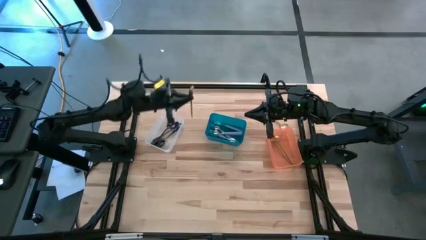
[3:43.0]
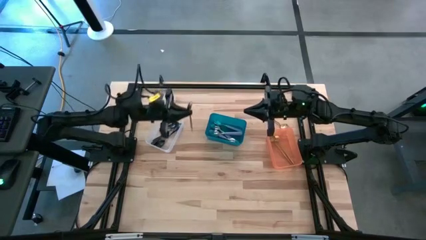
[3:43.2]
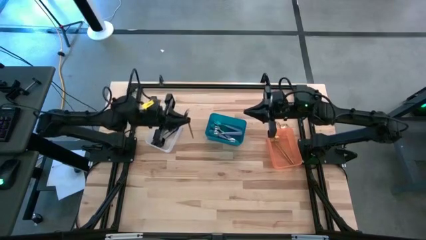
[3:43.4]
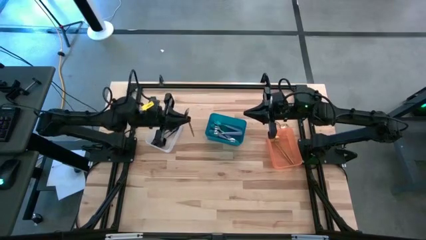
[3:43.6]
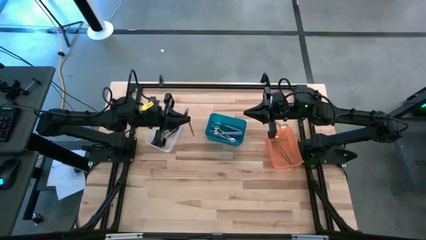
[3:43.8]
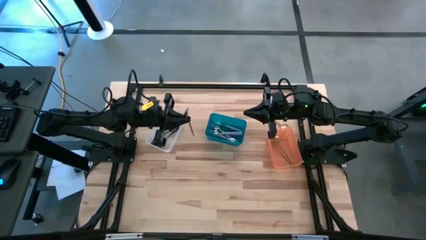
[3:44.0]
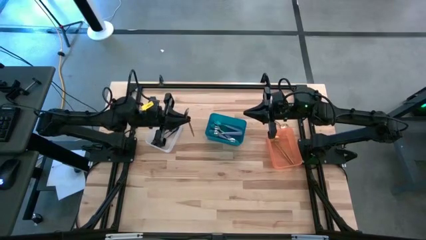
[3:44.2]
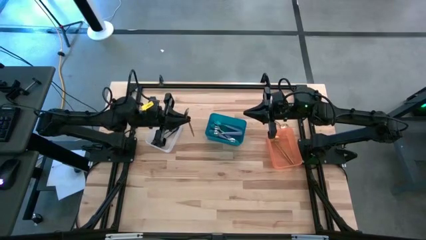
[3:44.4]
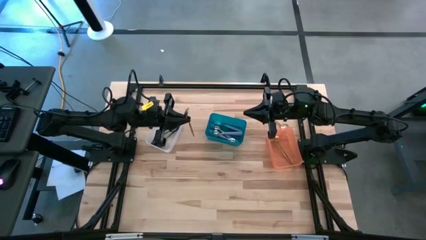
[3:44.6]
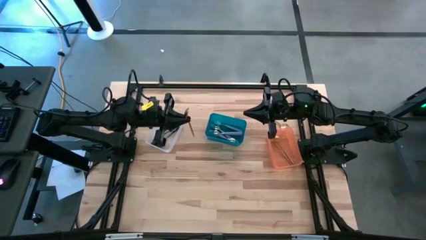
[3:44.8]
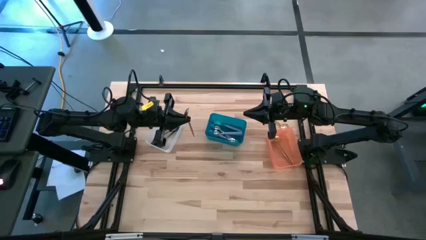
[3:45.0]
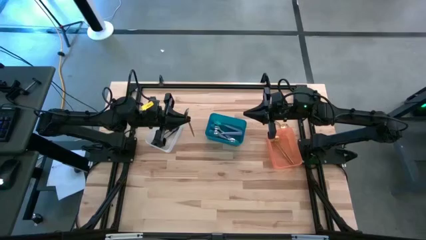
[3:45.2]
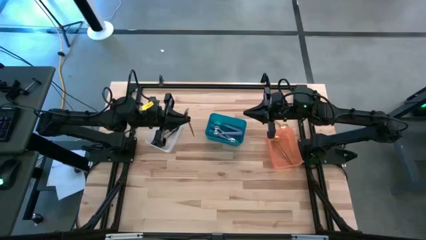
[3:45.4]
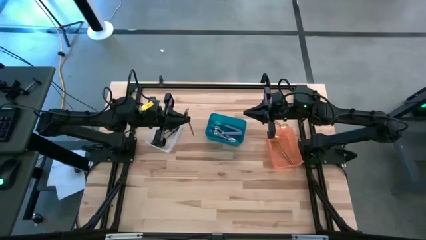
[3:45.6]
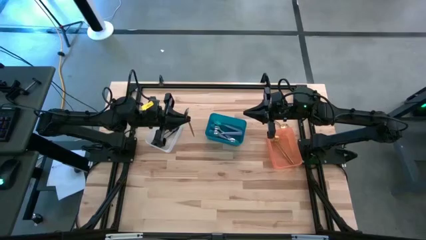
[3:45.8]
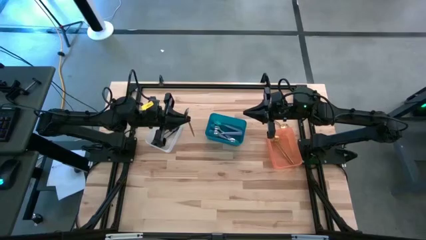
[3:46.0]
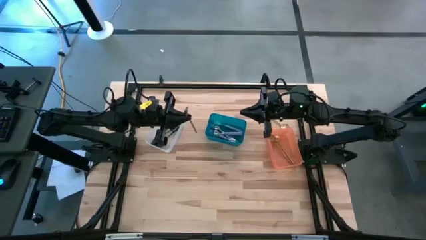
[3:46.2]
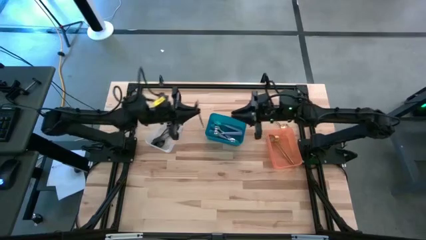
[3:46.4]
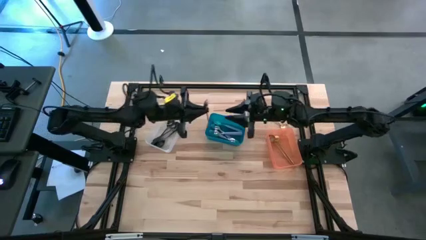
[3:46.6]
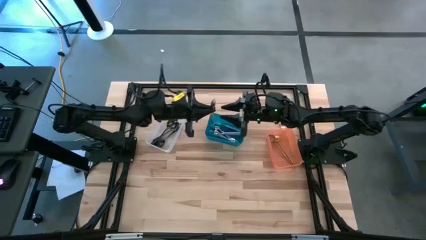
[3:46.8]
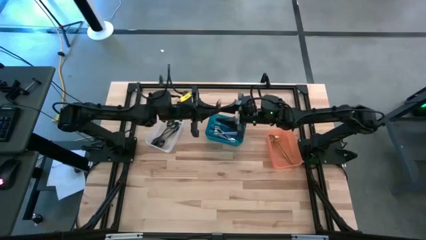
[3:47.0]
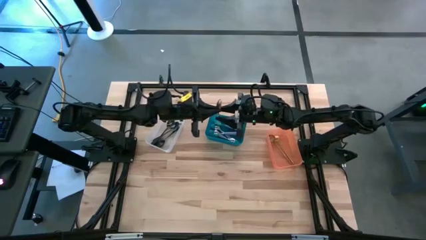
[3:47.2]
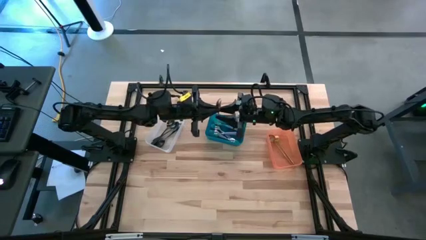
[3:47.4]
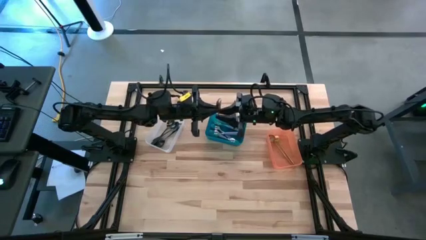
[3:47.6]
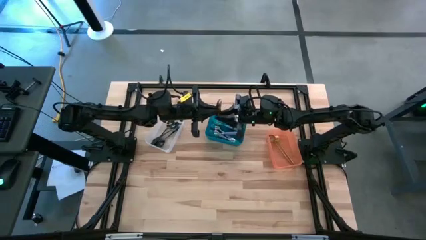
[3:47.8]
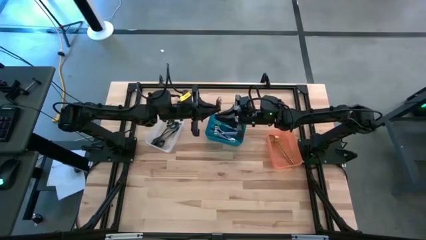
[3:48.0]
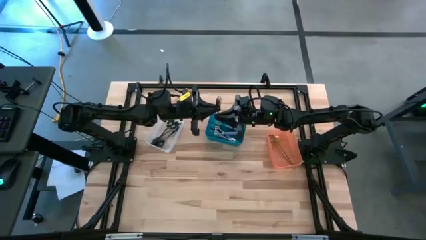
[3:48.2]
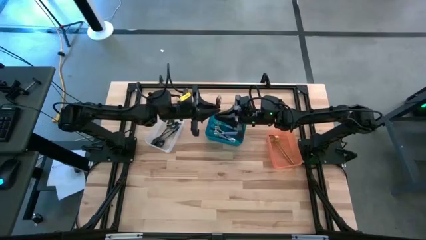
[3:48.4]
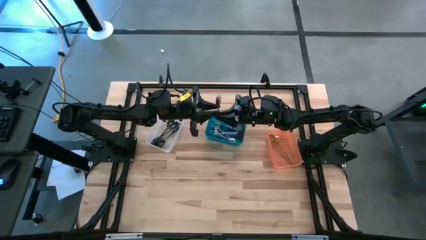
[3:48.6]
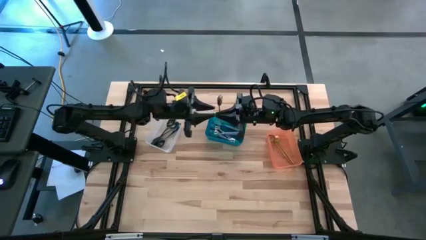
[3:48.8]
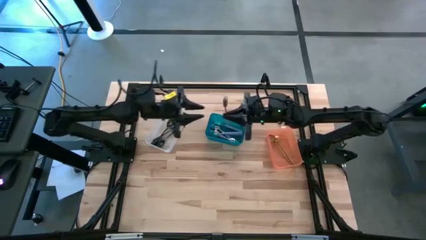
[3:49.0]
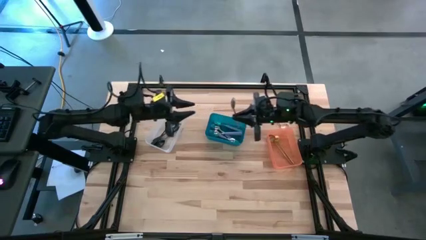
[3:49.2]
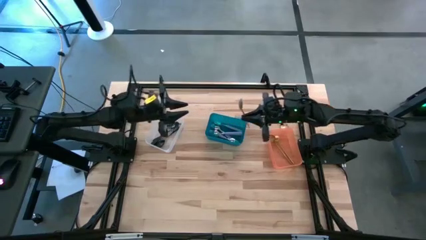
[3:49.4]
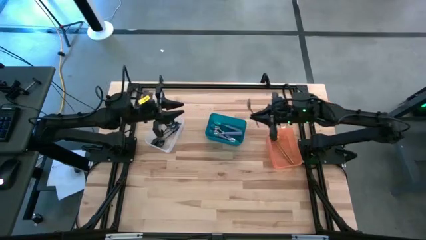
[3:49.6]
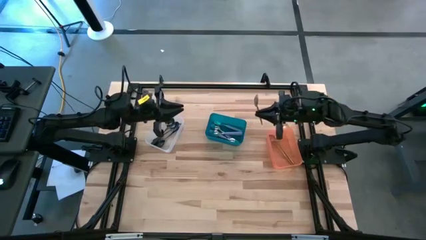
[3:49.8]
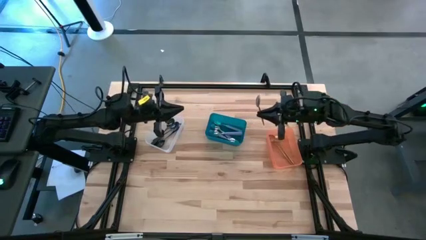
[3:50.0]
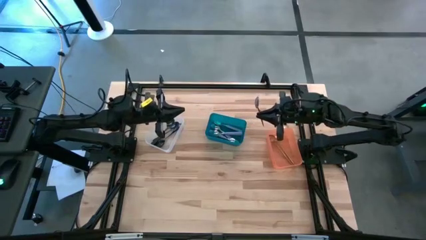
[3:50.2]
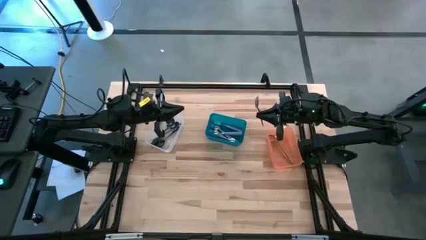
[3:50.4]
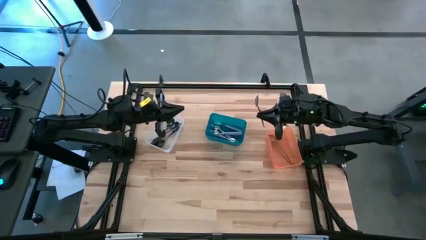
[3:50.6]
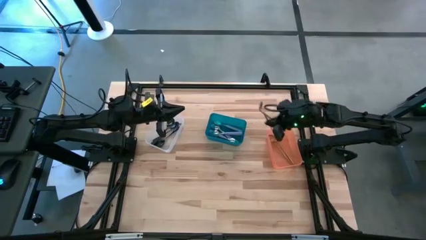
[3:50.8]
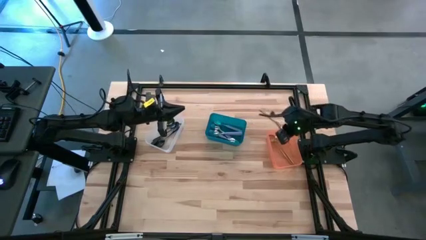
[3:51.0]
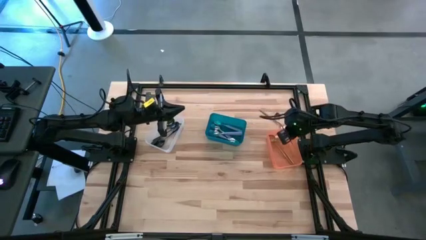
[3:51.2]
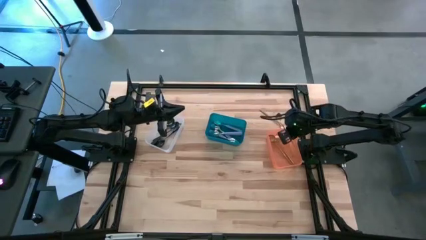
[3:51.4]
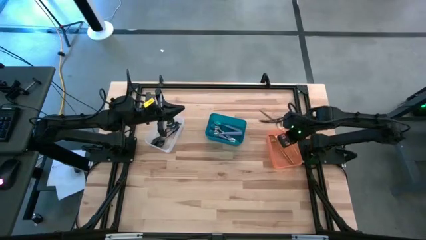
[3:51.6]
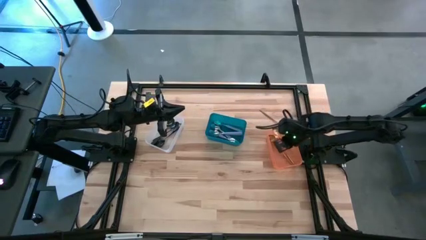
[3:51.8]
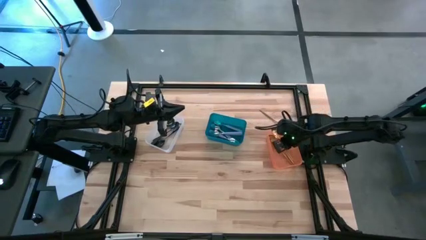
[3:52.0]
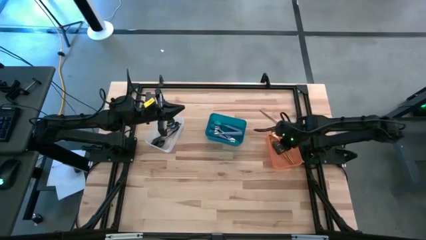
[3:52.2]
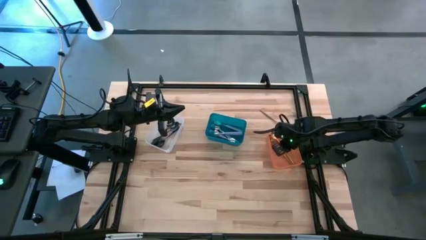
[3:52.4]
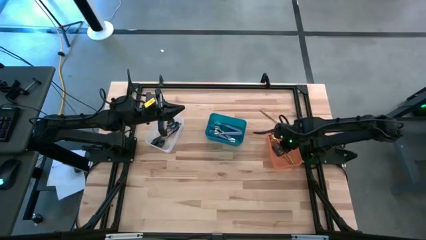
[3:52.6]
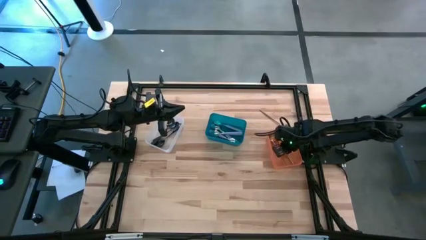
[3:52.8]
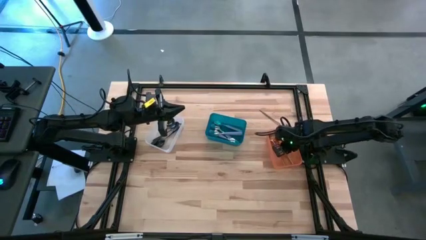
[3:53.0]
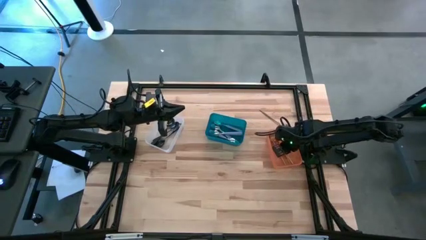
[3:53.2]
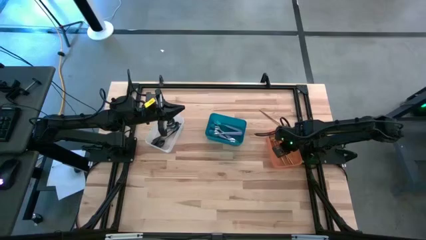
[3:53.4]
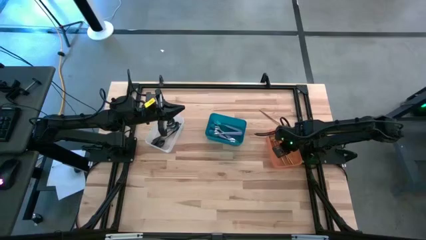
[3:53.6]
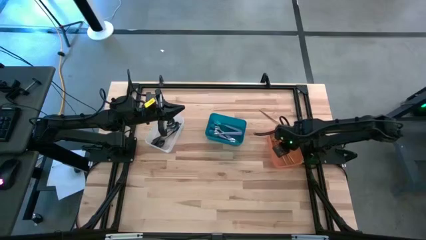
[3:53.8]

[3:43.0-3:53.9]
Task: Sort silverware by color (type)
Put the gold spoon into the orange bin
